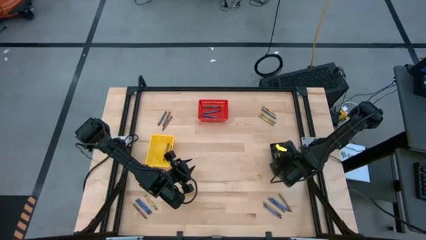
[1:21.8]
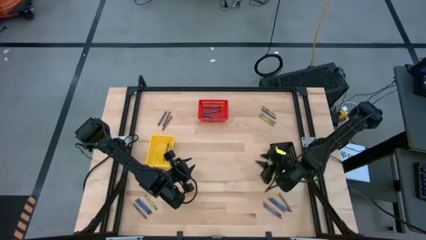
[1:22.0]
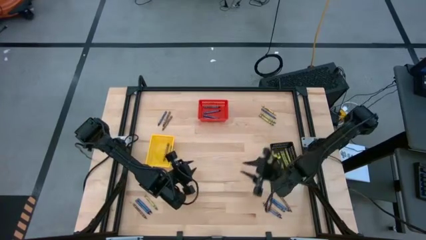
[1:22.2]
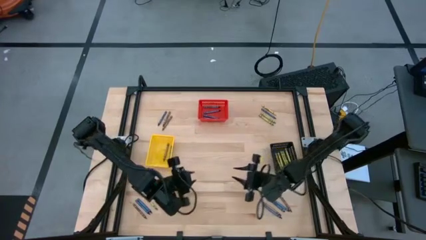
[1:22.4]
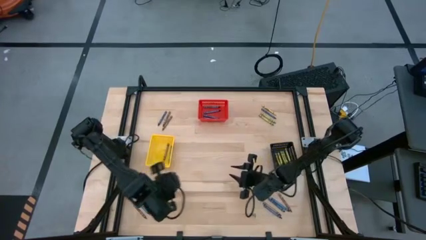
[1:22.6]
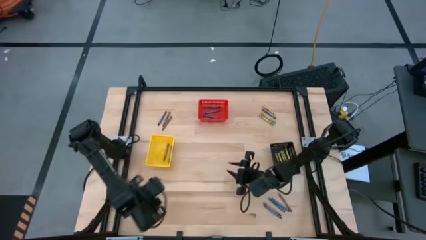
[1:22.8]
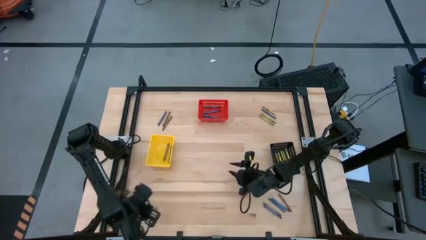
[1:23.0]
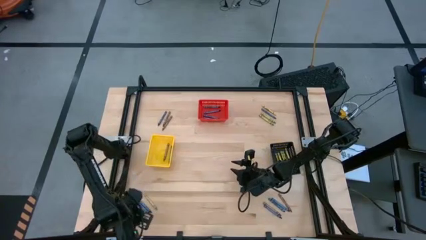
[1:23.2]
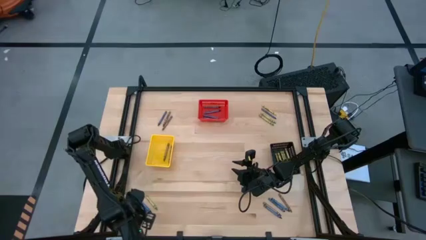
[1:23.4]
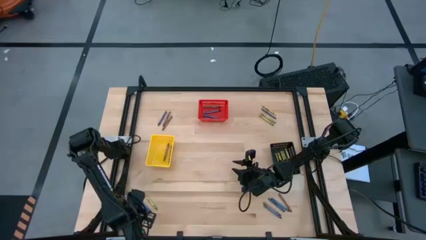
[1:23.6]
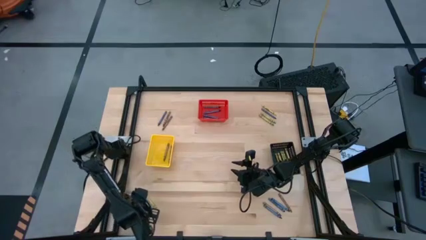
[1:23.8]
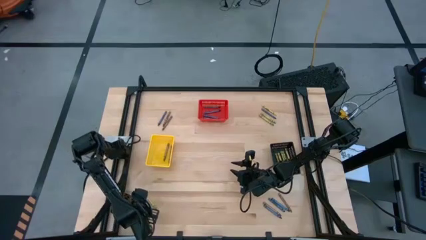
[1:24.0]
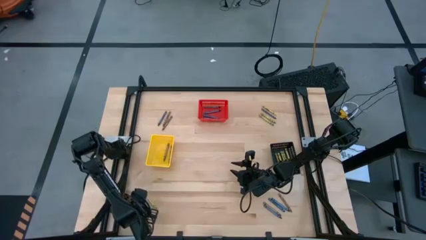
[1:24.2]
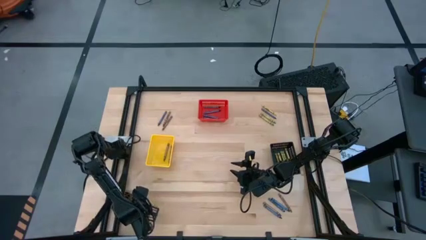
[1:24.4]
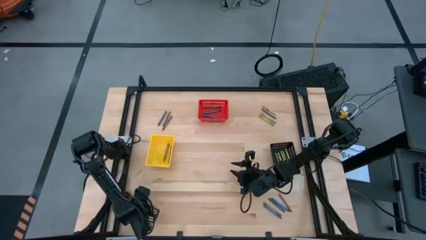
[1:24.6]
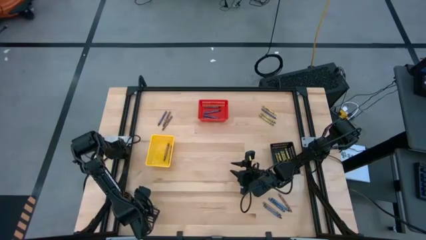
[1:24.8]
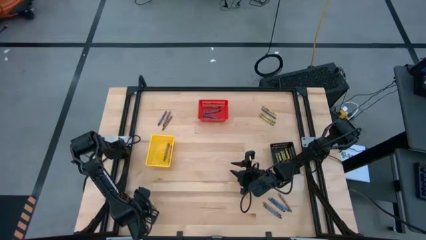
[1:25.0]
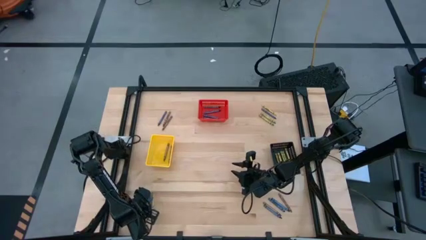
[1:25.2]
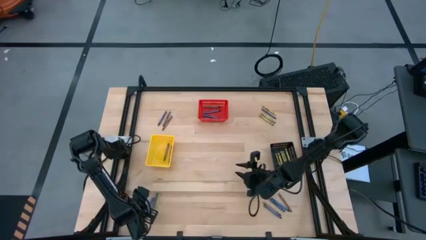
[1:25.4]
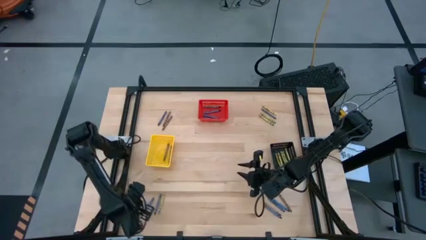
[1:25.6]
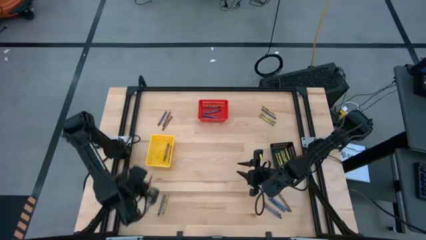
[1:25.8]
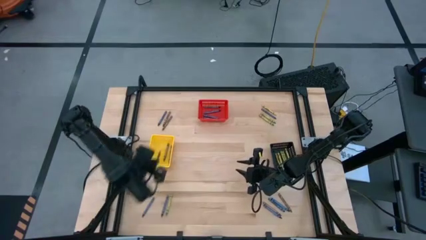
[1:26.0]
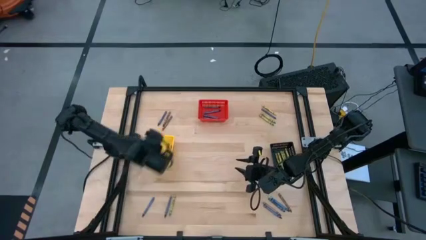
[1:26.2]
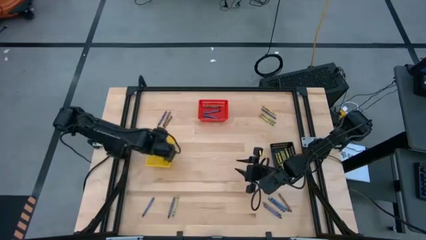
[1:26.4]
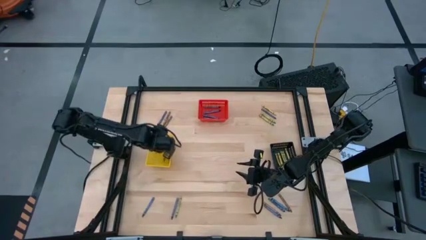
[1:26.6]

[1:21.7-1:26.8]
Task: Sort crayons
Put the brown crayon into the yellow basket

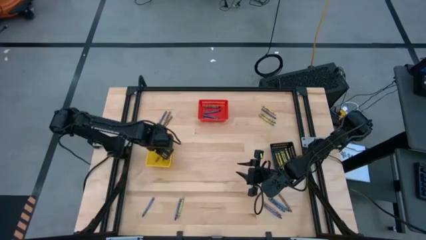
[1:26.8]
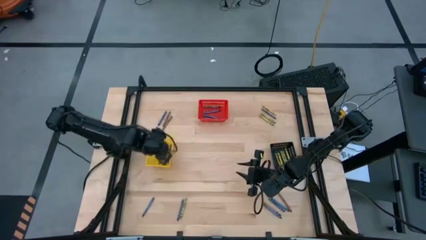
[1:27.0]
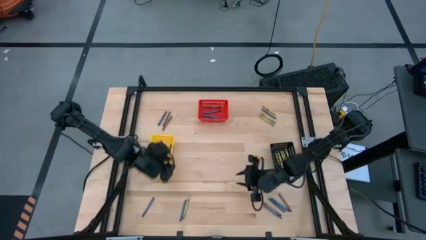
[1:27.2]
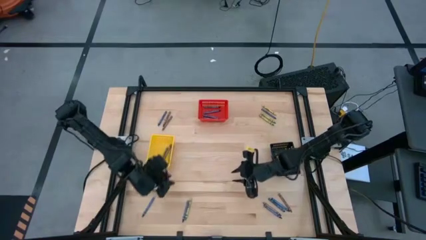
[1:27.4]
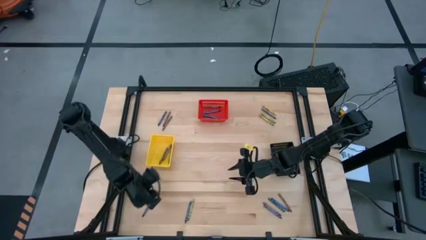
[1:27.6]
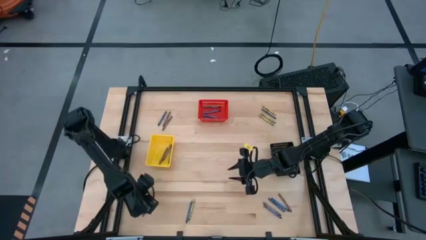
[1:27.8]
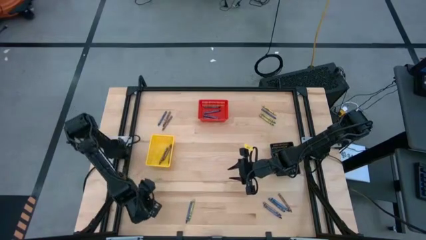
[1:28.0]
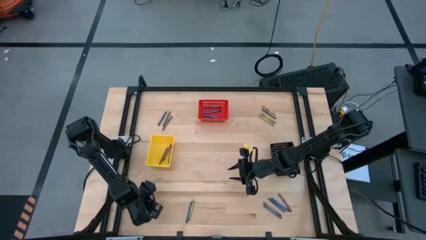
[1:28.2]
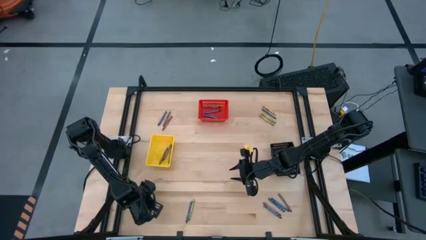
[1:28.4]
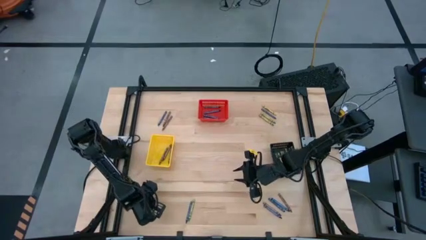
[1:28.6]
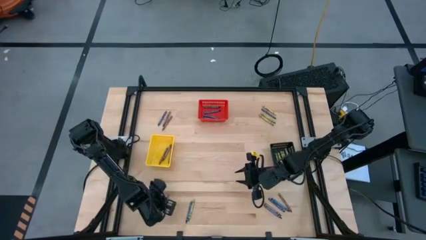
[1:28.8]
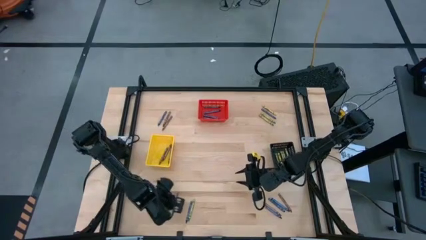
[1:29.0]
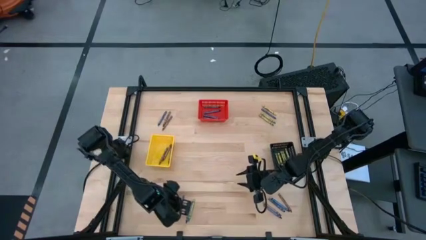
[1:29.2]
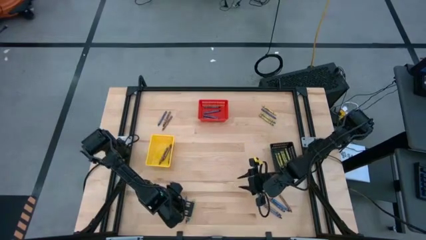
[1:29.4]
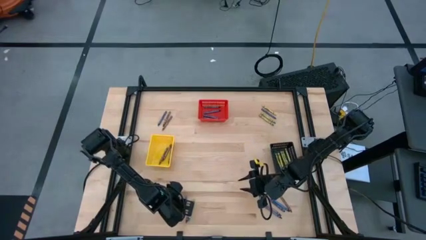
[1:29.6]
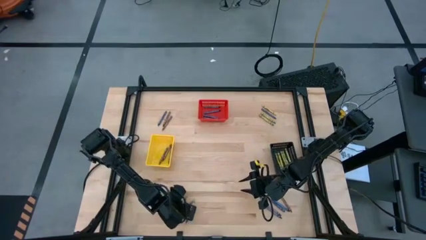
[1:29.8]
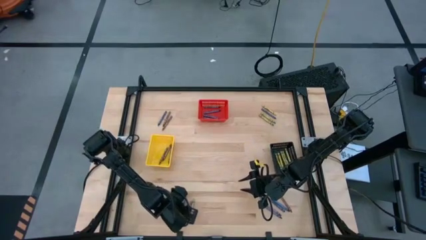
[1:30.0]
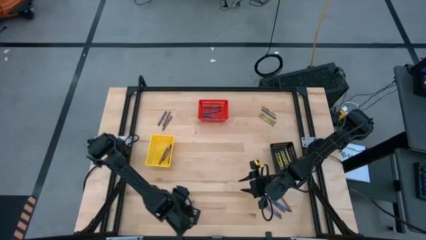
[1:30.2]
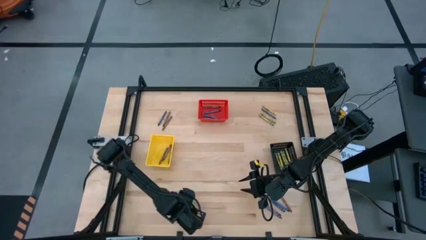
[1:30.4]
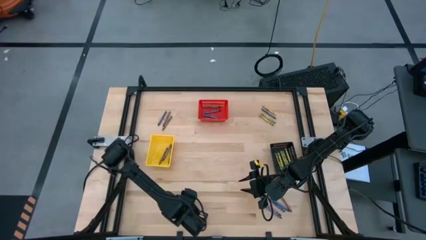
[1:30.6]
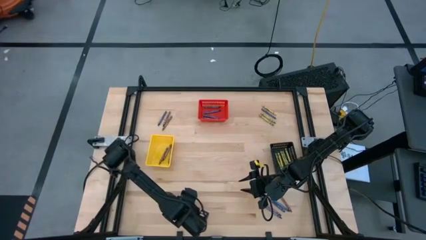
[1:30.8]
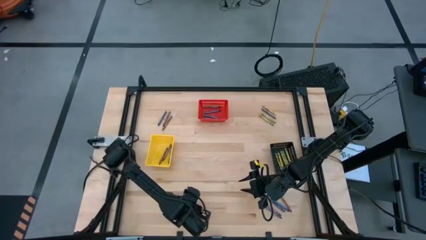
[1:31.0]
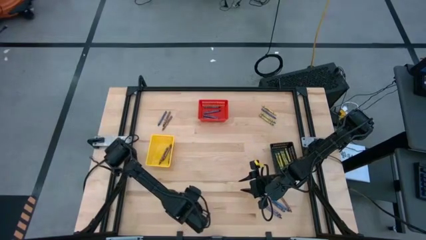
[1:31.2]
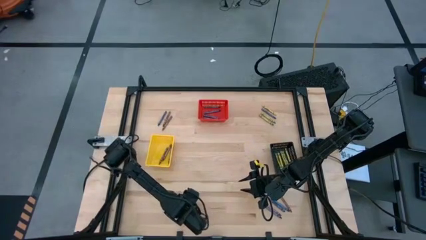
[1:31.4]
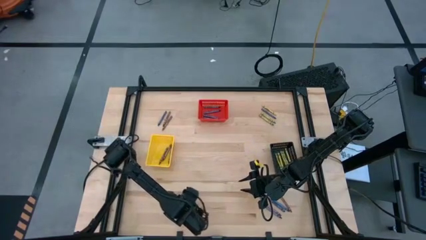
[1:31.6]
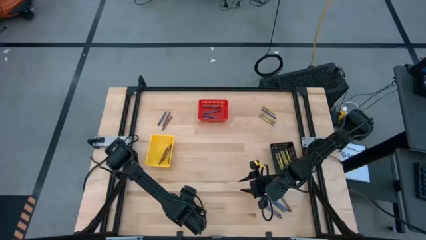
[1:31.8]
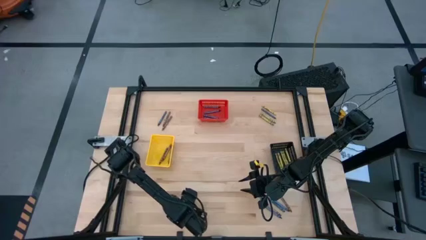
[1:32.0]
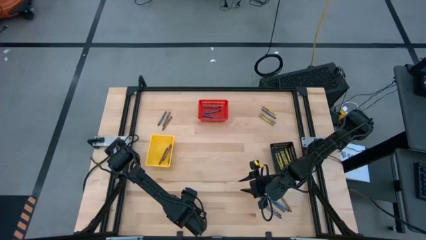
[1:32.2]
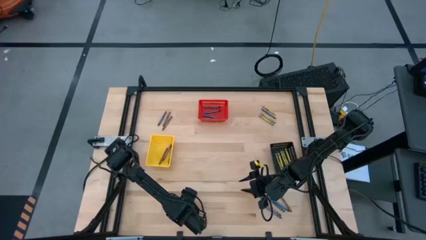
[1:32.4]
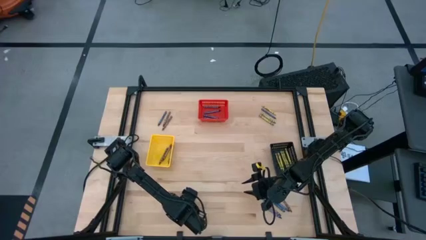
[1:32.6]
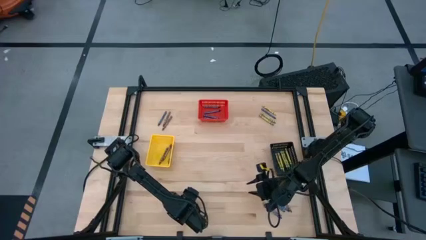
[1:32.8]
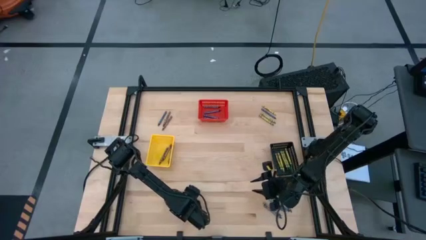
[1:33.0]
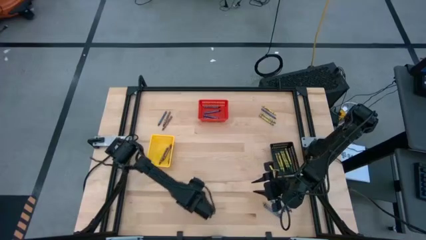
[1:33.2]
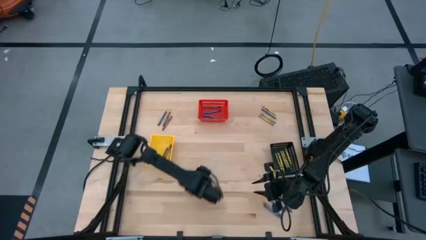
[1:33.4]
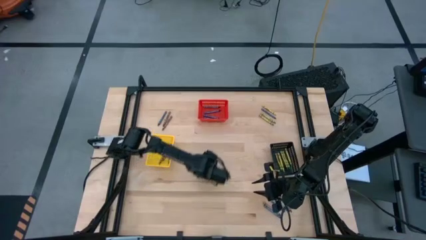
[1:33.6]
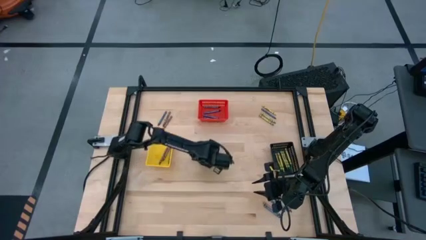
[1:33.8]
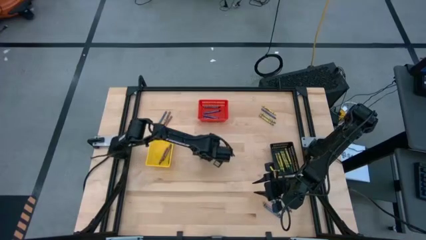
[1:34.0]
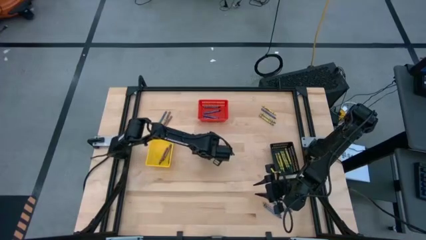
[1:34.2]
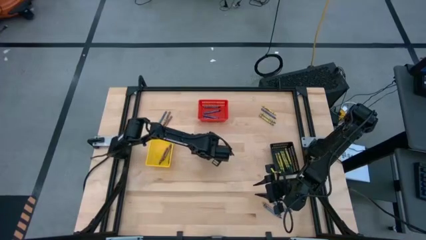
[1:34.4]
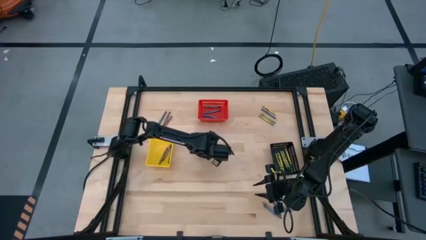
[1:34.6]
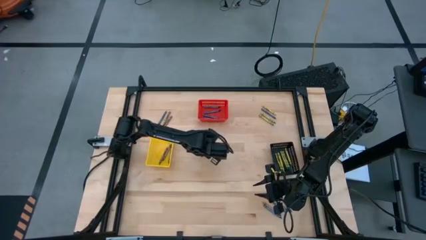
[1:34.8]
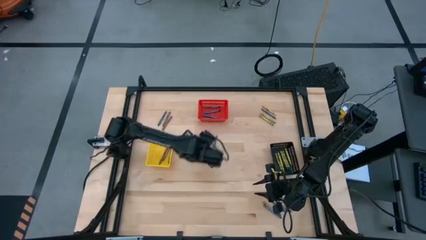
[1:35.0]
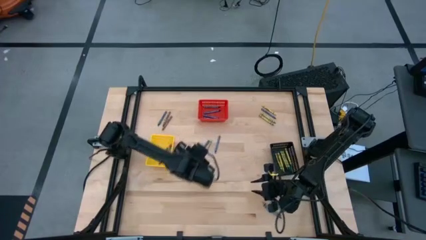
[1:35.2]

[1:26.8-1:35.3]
Put the blue crayon into the red basket

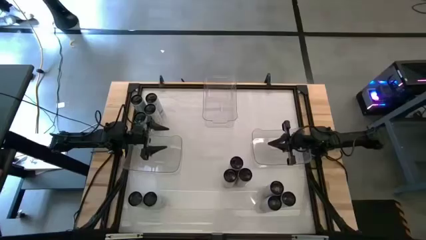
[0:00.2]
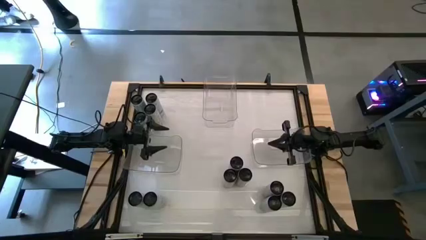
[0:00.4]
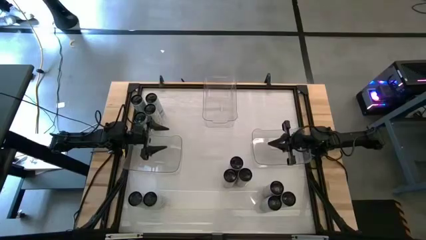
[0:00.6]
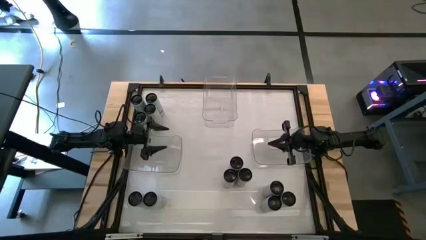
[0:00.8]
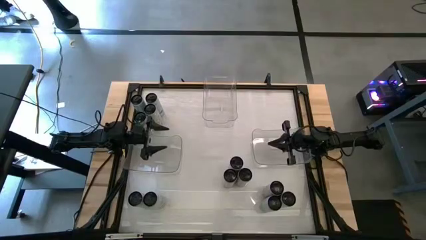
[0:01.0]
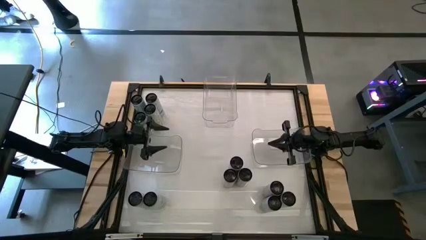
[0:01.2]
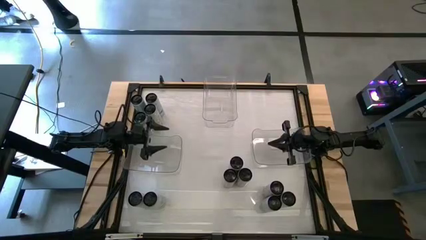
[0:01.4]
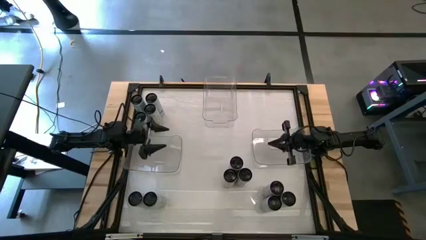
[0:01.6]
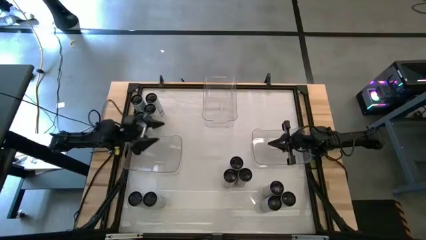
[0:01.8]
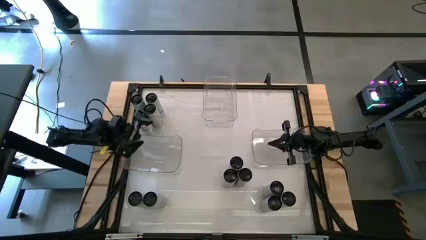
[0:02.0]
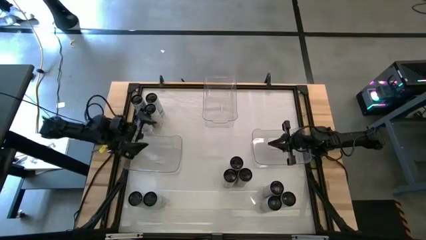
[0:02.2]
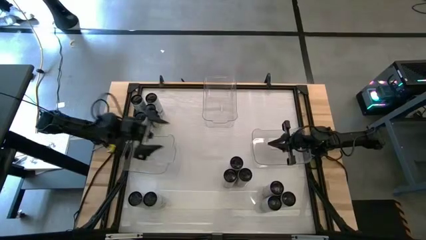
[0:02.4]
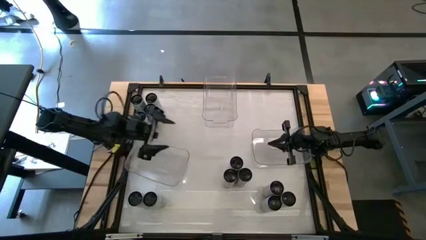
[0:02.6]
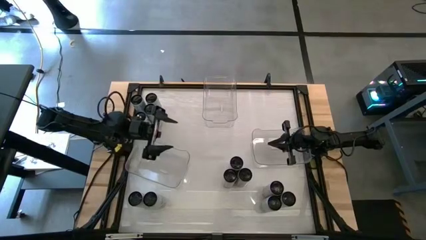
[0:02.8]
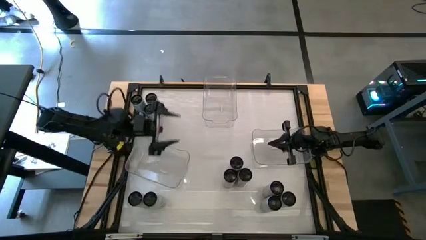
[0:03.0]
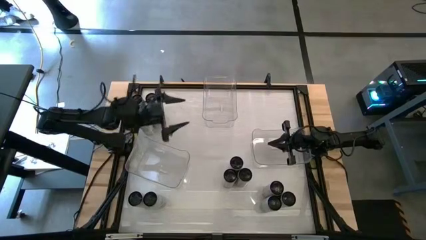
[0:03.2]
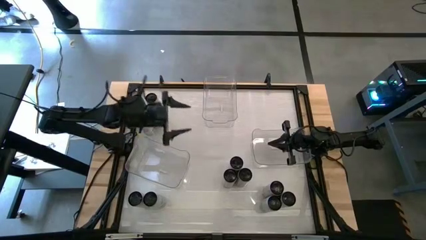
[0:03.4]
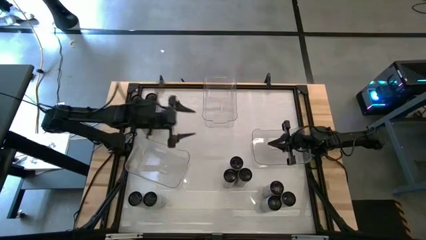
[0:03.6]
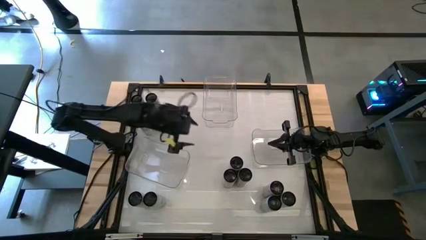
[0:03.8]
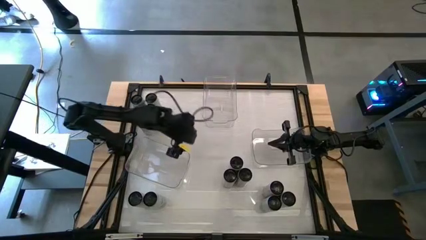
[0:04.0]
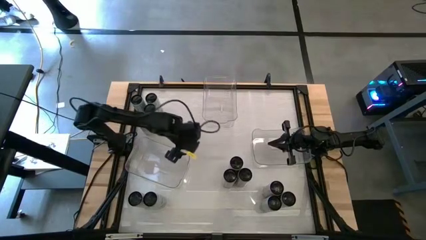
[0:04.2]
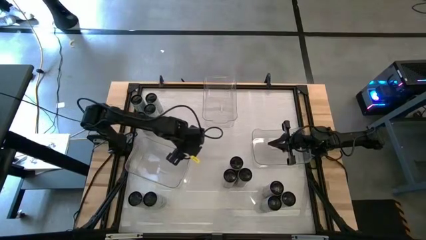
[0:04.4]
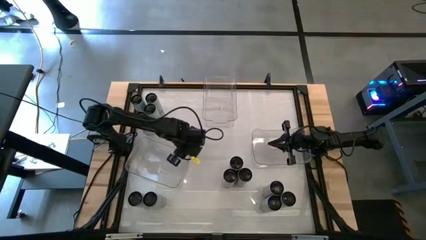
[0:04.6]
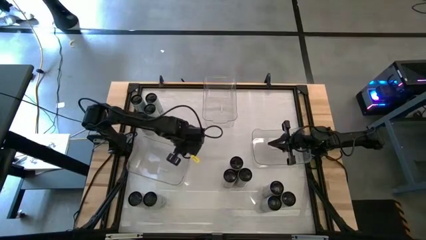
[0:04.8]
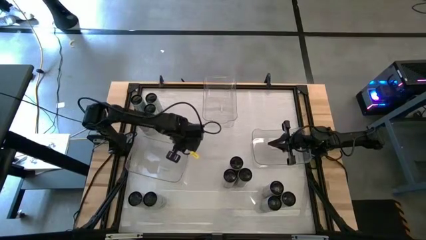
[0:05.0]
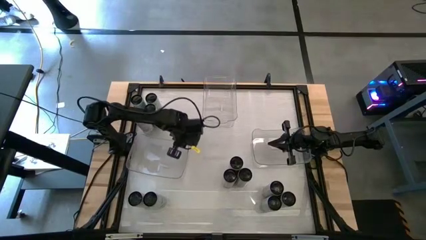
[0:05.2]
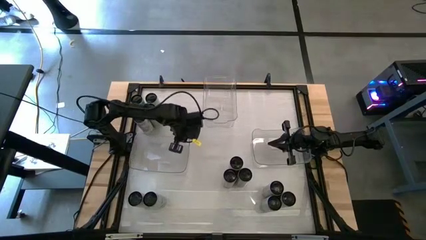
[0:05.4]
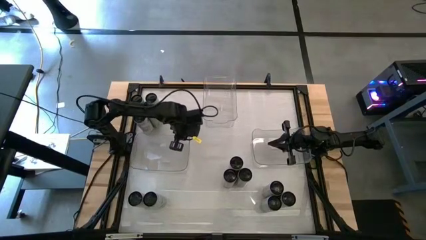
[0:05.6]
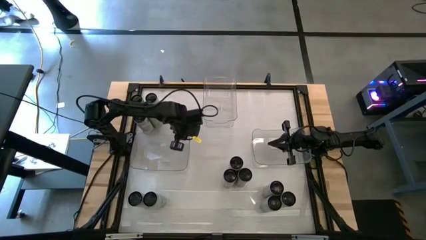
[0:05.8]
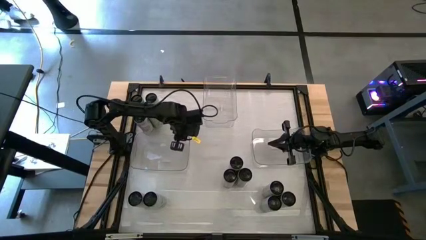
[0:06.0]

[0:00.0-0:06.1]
Task: Sort soda cans
Adjust the bottom left transparent bin
